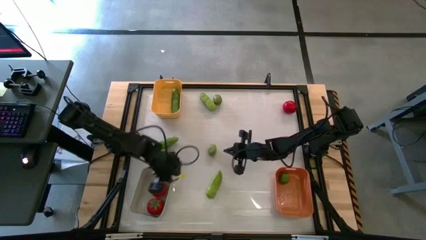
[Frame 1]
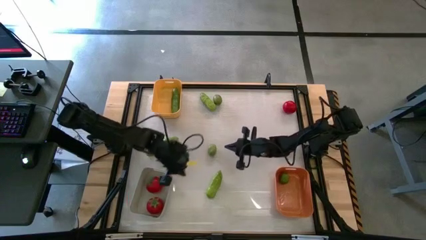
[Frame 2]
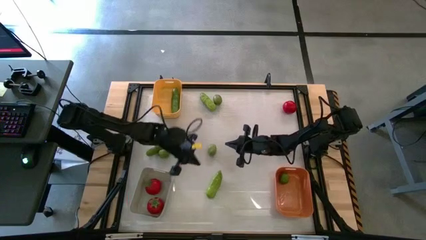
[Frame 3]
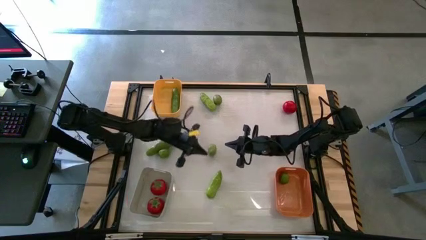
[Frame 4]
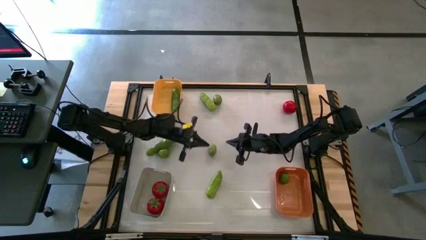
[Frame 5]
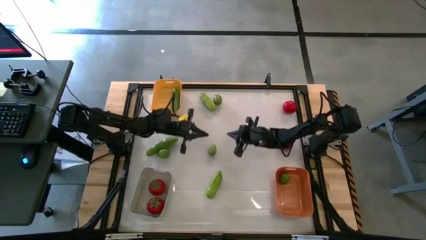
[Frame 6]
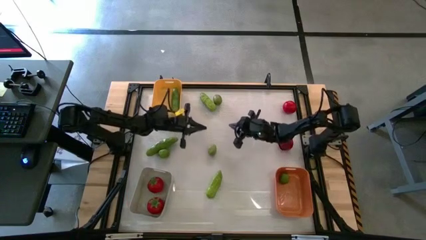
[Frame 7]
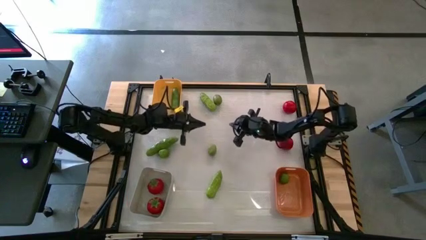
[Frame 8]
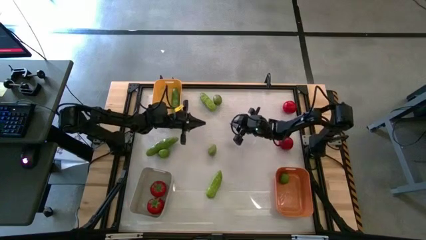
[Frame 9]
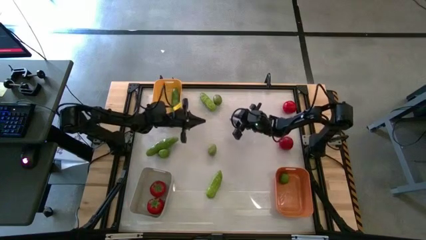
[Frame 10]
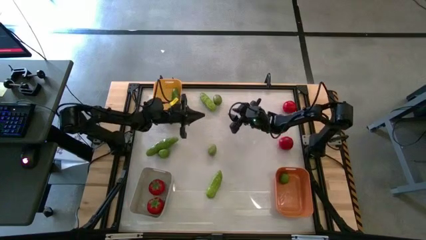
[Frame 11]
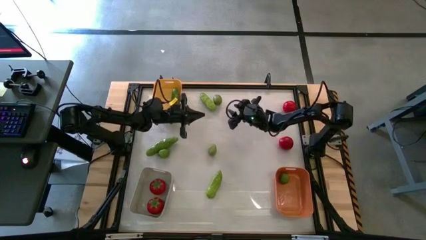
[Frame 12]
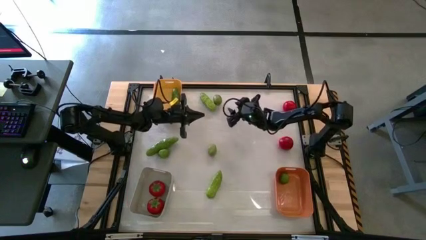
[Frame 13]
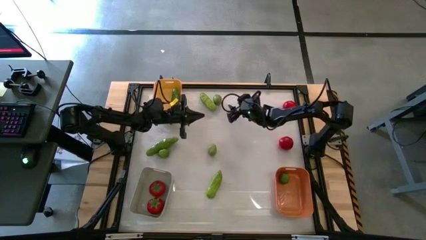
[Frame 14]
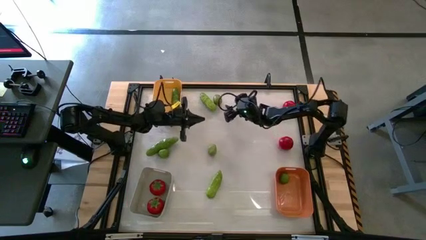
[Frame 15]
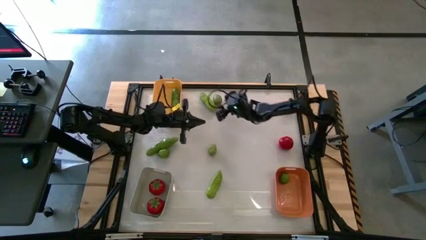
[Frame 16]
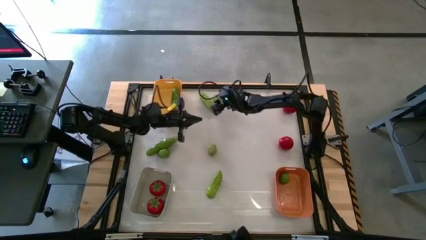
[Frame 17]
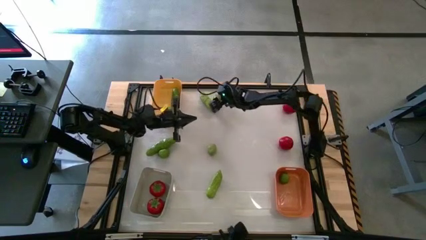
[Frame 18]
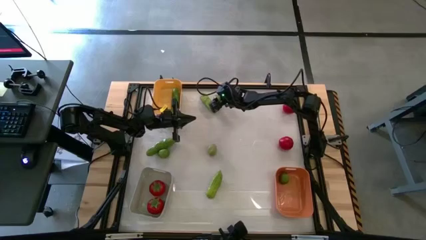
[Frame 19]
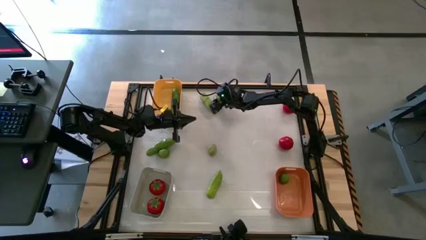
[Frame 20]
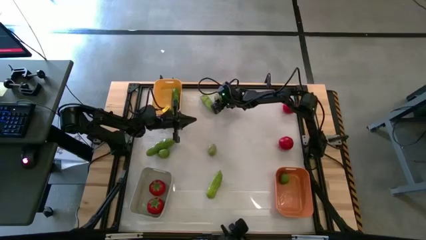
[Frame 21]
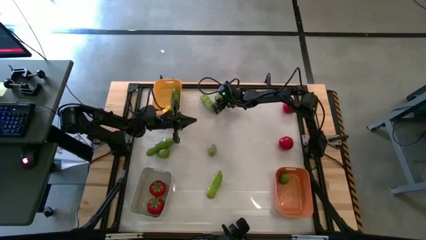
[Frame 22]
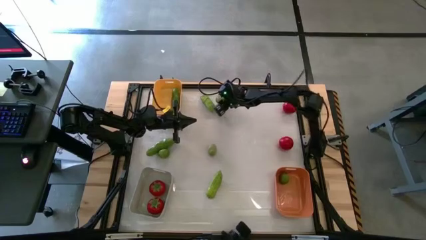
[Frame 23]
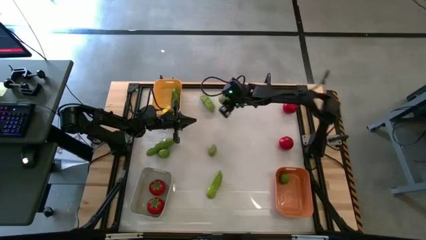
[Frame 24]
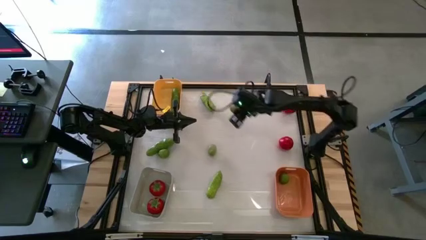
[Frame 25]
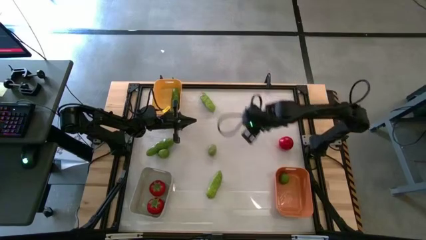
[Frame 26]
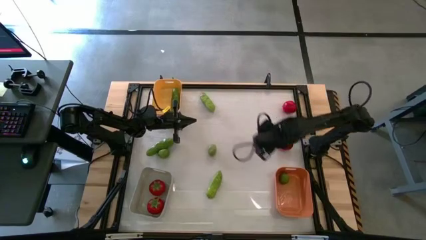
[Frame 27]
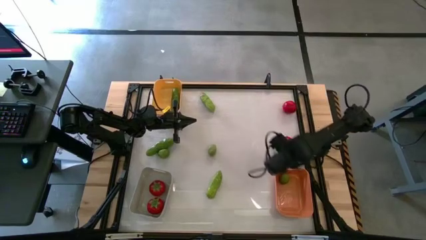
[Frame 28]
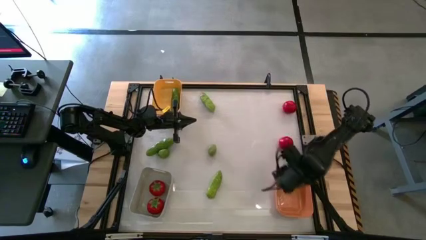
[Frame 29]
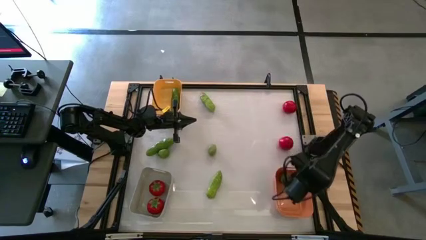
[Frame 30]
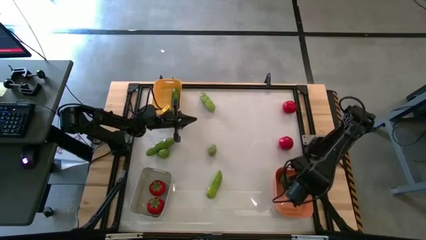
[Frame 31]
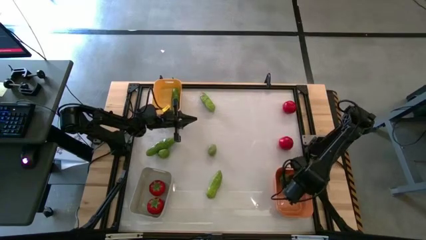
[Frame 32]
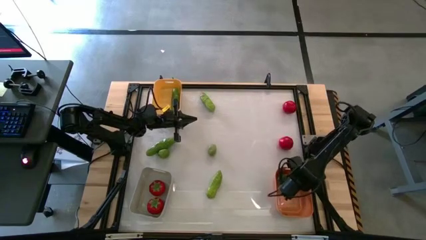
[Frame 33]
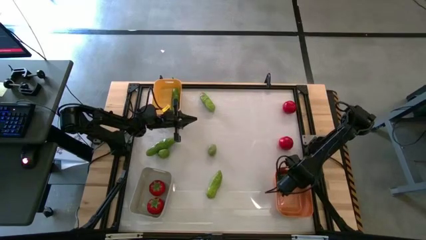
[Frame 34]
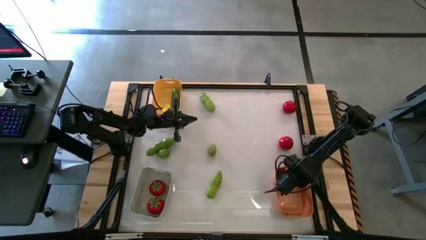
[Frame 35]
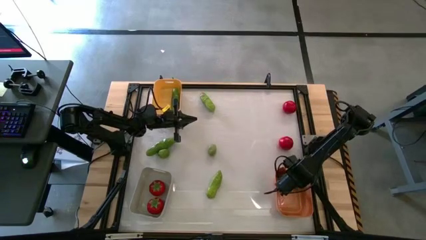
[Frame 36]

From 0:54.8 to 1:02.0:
Task: Sort produce into baskets
Put the green lime into the orange bin

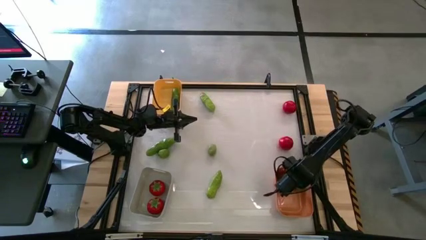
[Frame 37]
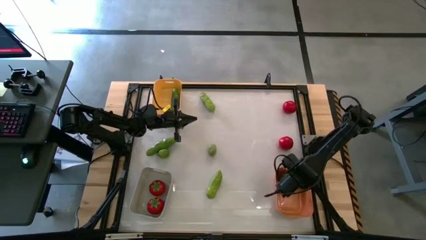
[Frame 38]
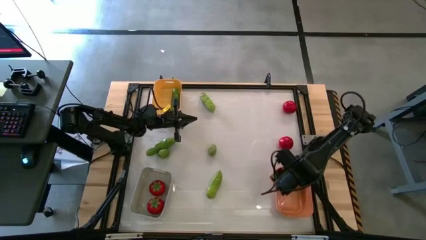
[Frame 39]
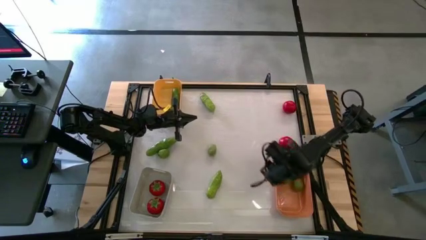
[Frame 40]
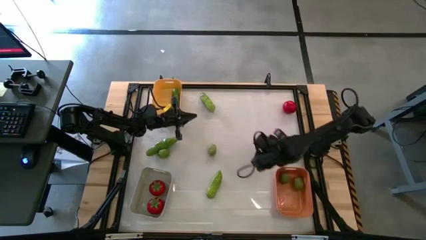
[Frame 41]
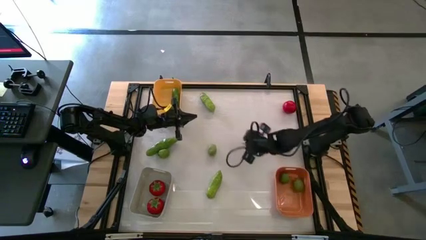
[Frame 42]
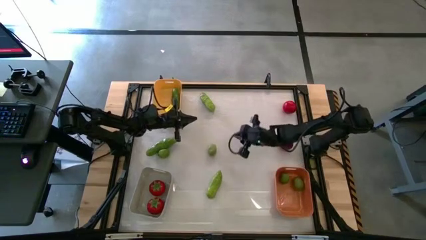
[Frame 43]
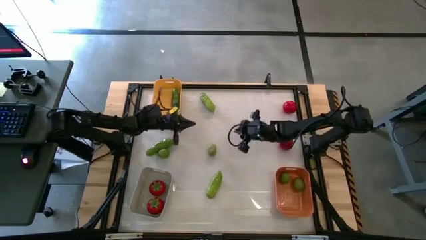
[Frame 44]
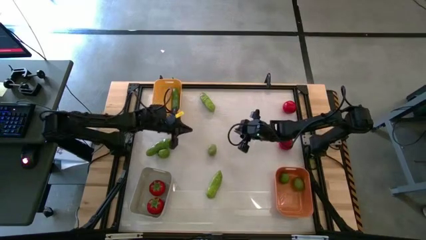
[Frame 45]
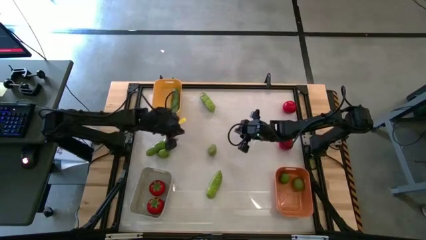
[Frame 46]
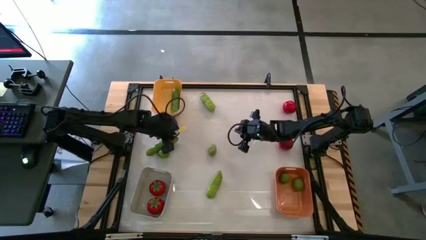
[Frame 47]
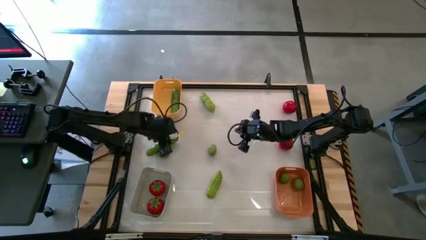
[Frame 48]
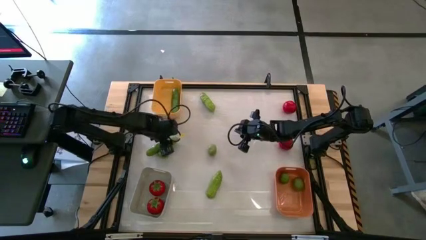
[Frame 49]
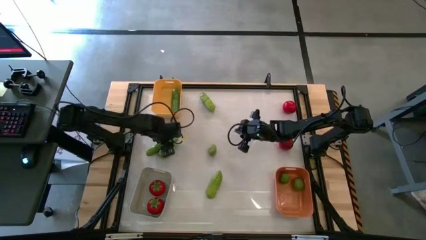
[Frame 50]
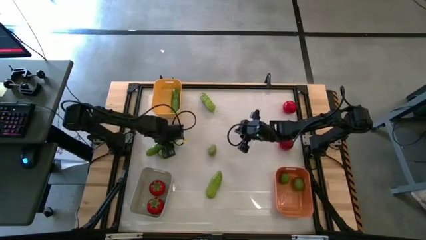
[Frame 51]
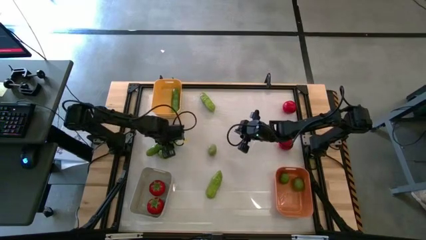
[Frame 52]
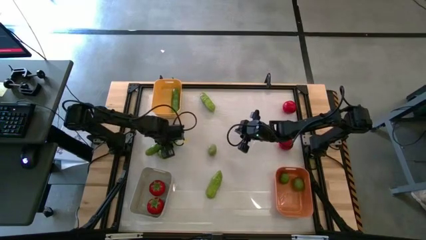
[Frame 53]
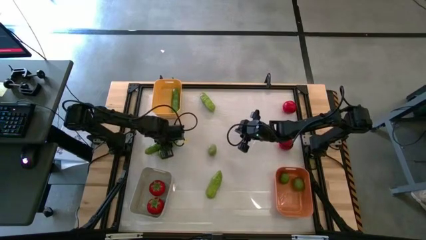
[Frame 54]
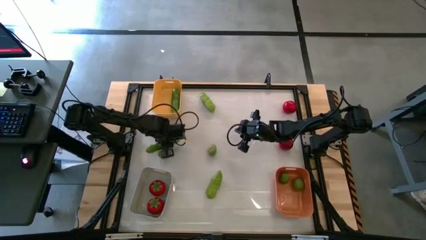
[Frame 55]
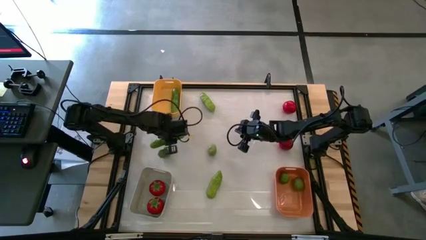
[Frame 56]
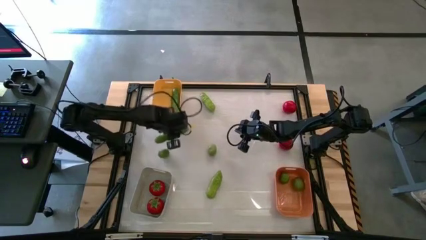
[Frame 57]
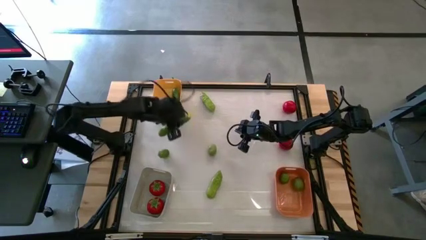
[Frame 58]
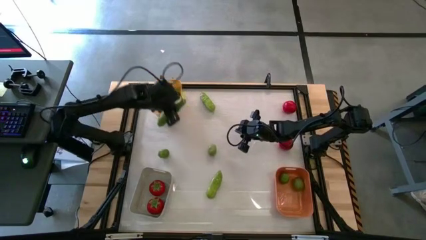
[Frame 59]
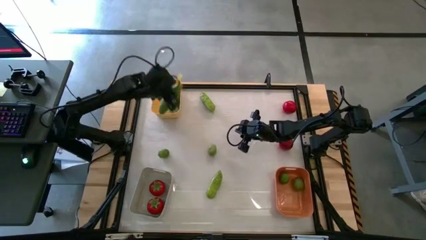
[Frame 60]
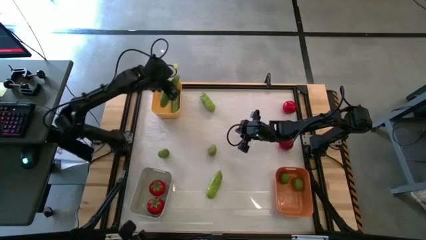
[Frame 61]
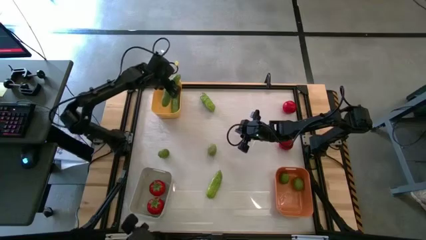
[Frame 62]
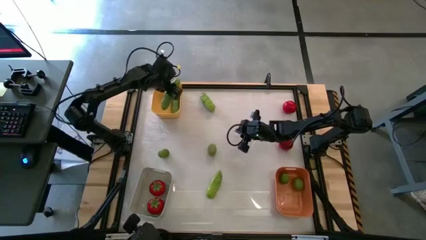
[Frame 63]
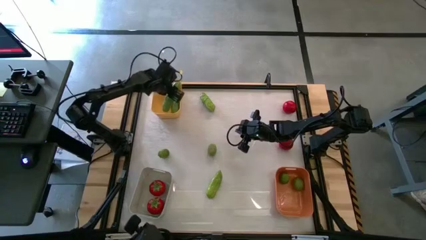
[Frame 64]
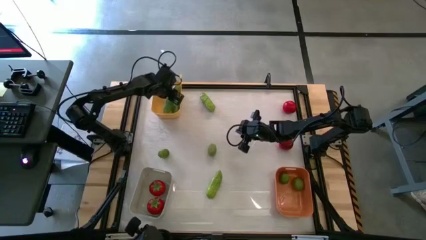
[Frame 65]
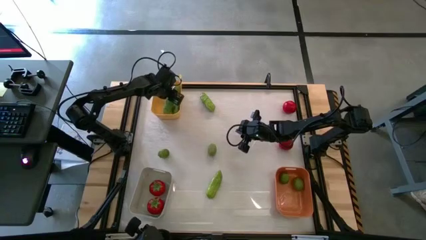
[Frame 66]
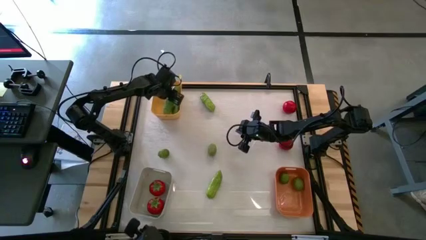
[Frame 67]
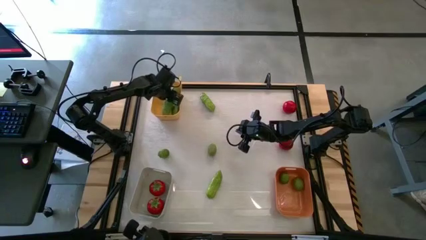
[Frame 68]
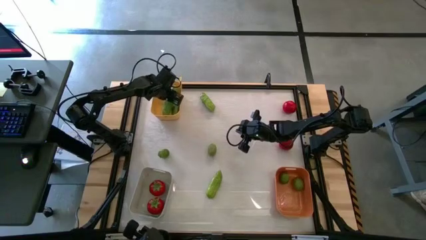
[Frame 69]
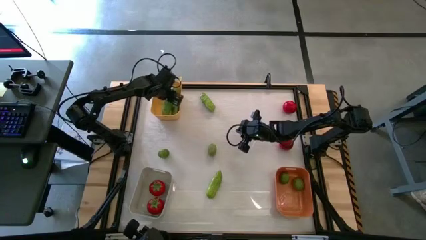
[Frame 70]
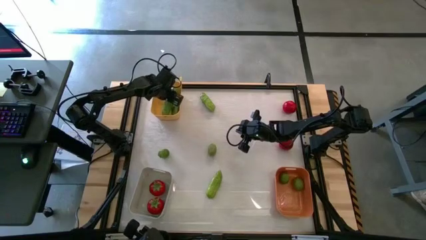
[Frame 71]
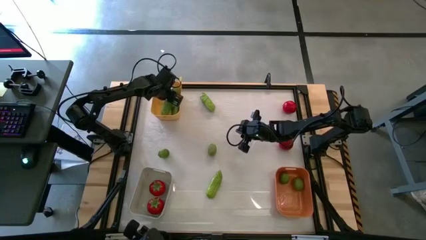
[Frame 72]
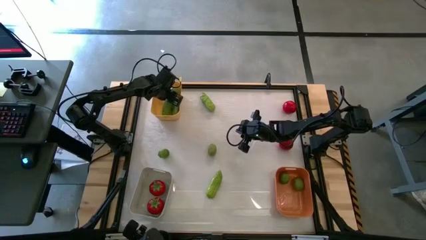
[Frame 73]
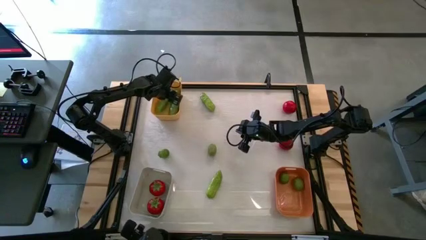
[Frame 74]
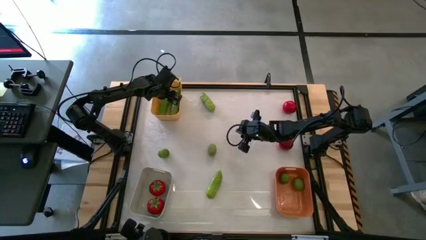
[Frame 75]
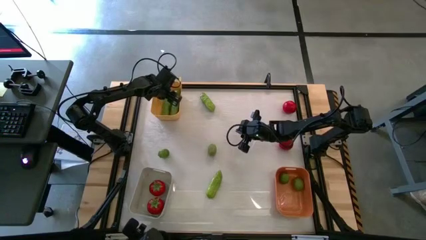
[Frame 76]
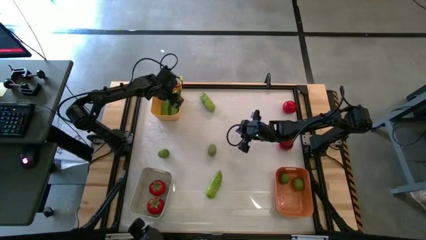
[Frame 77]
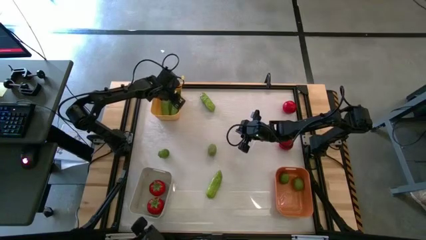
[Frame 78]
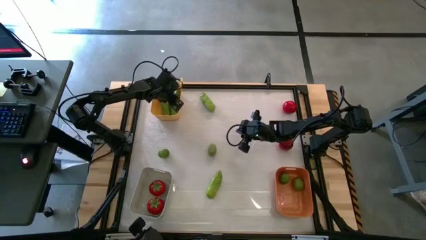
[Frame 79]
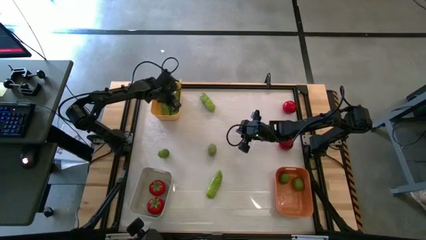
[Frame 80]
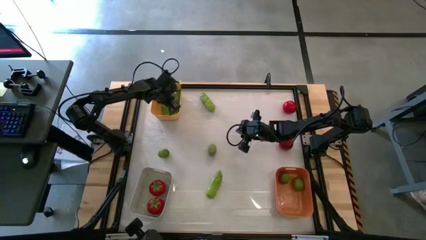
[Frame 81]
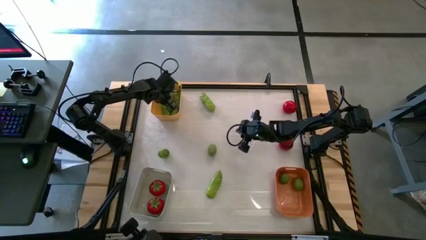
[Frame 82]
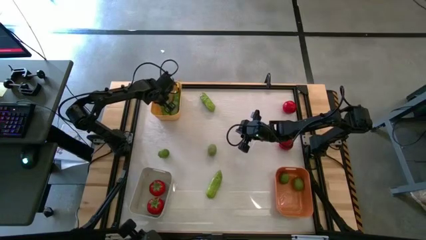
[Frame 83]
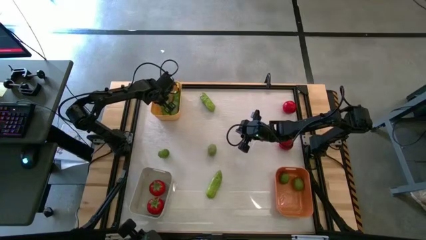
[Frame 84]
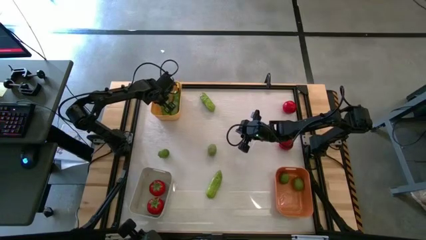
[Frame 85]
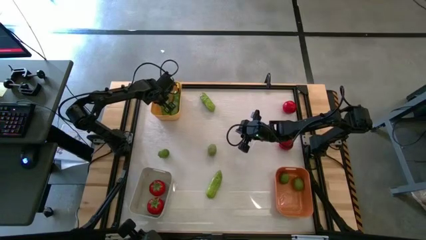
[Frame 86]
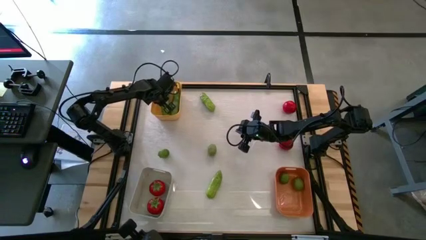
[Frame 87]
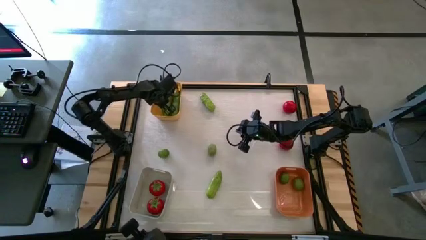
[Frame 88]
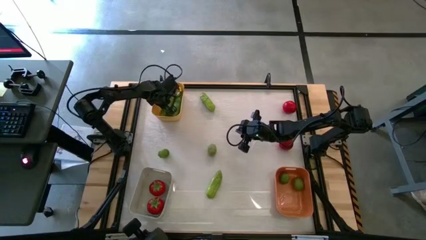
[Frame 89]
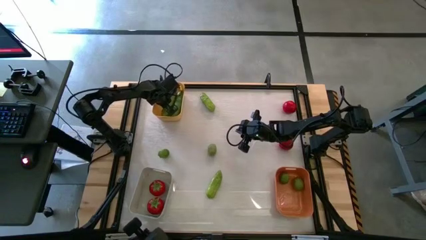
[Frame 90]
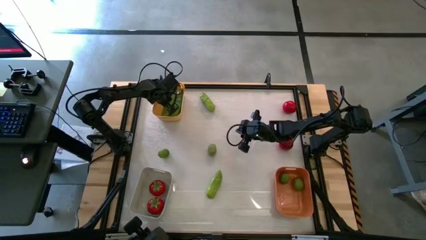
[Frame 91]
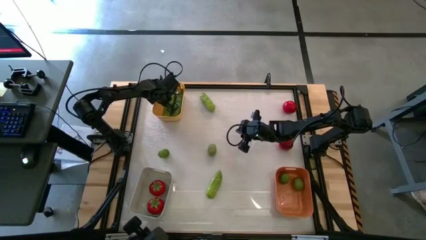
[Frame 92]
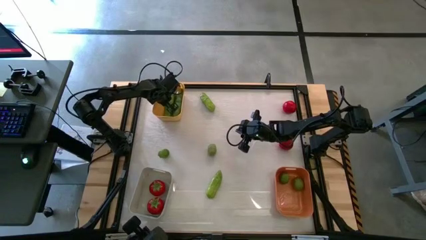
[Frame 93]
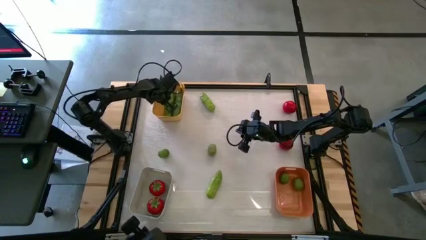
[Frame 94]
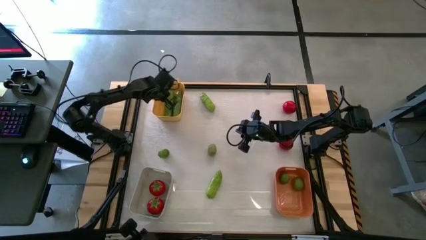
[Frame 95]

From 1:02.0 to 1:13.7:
Put the green cucumber into the yellow bin
